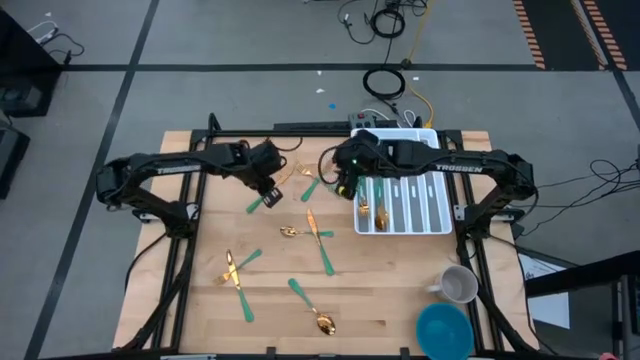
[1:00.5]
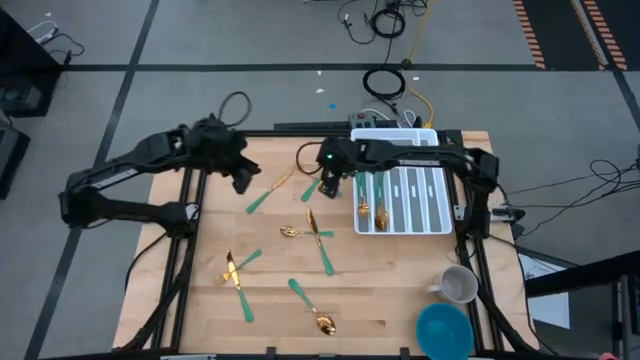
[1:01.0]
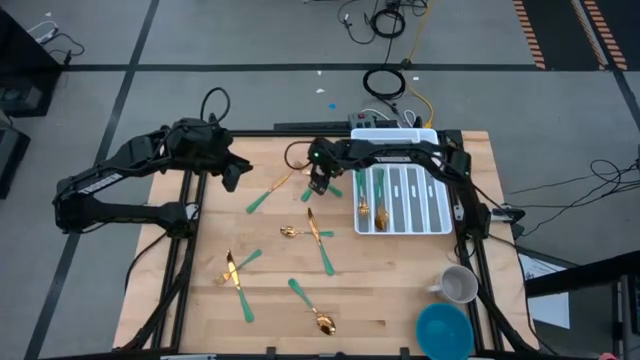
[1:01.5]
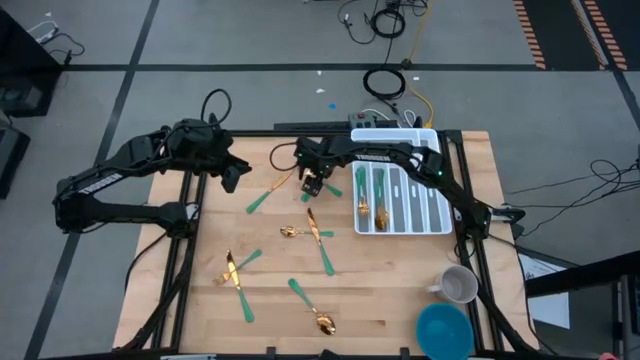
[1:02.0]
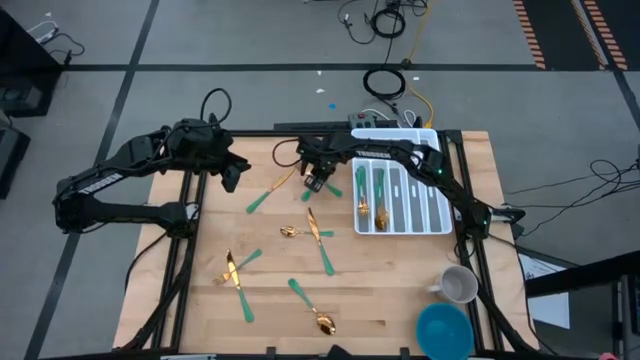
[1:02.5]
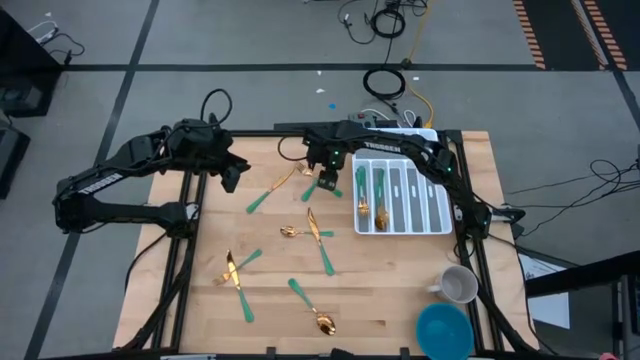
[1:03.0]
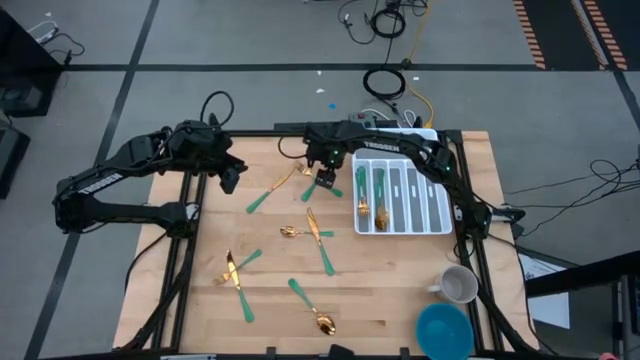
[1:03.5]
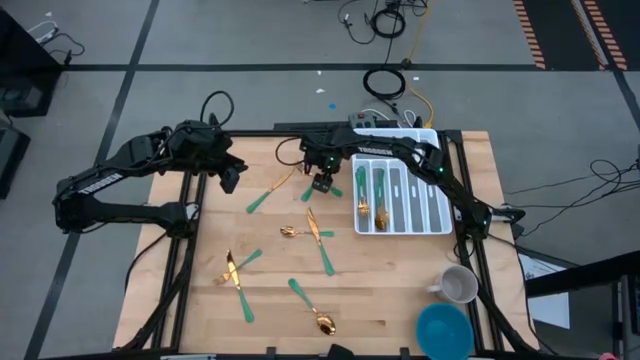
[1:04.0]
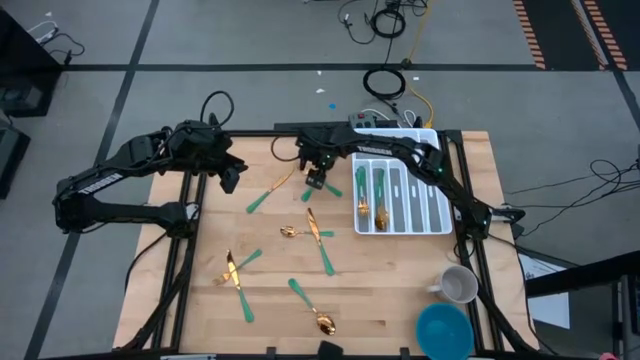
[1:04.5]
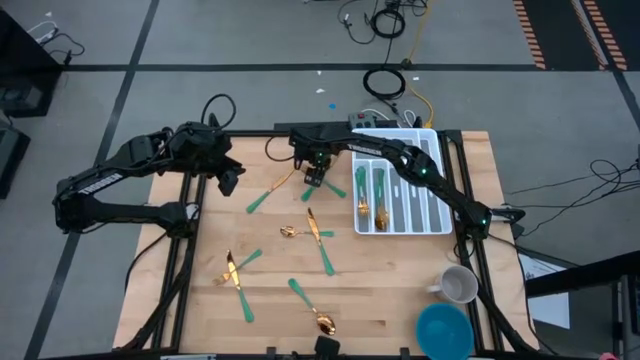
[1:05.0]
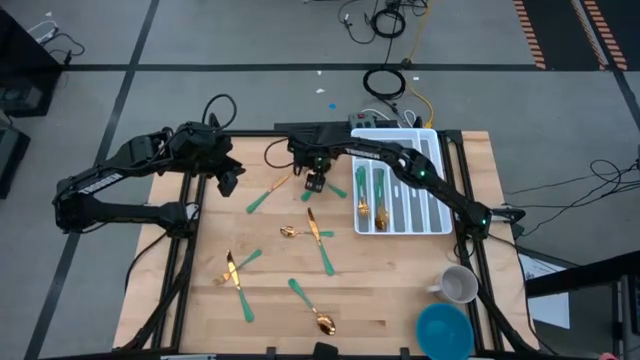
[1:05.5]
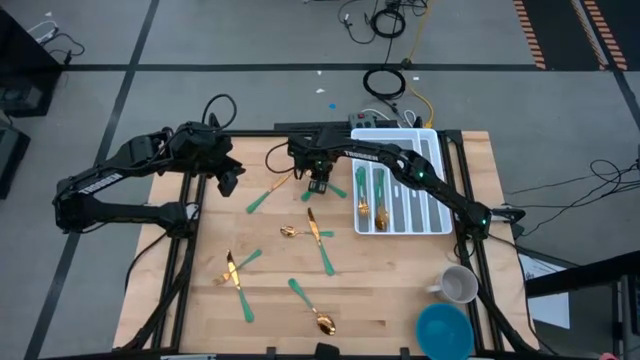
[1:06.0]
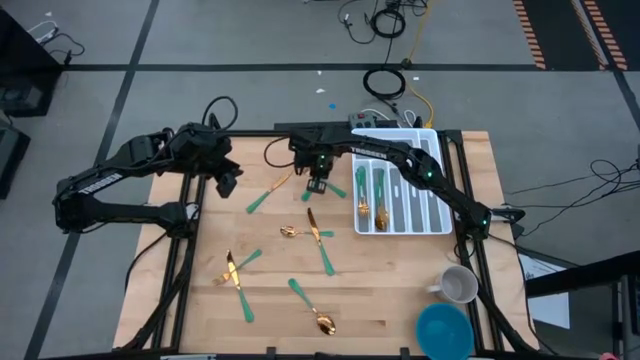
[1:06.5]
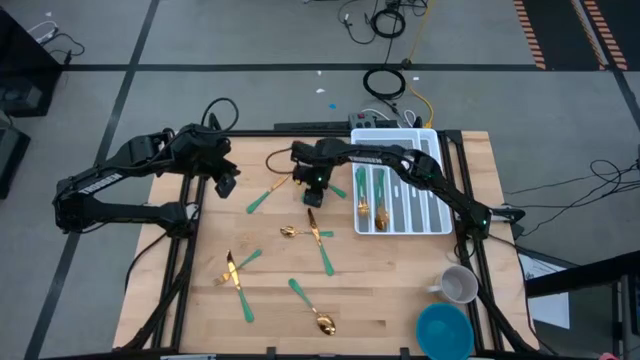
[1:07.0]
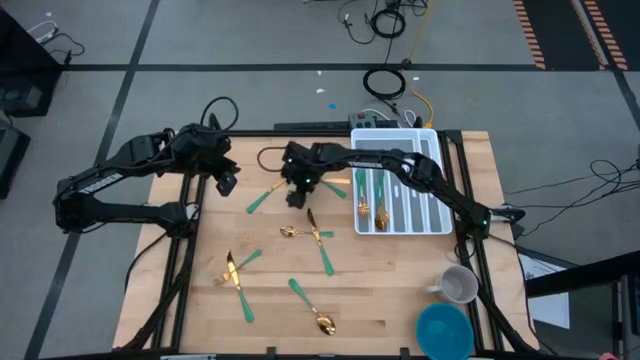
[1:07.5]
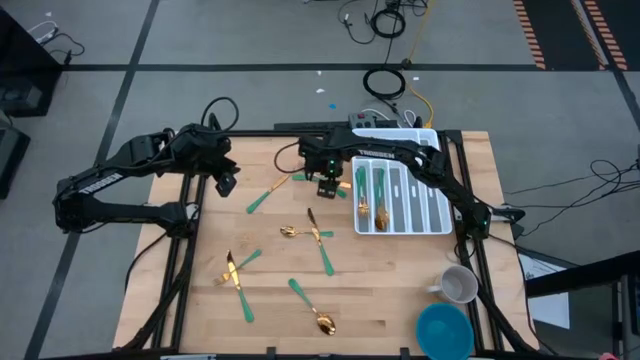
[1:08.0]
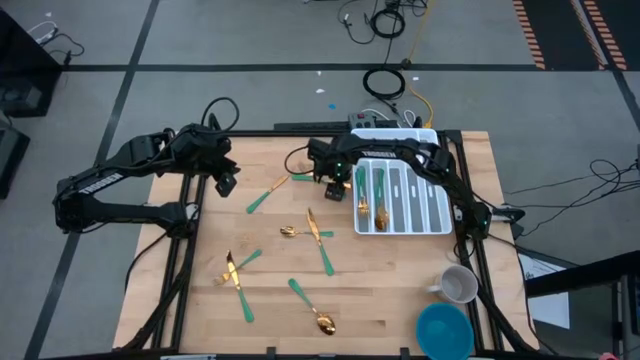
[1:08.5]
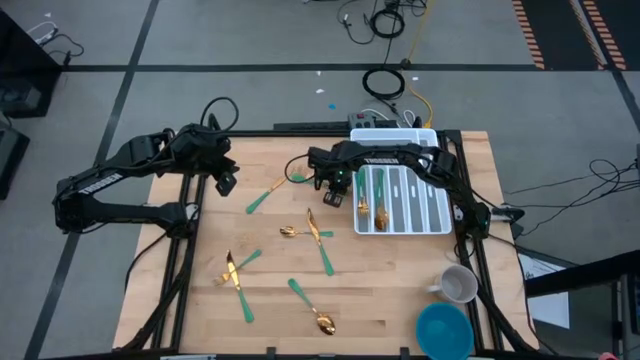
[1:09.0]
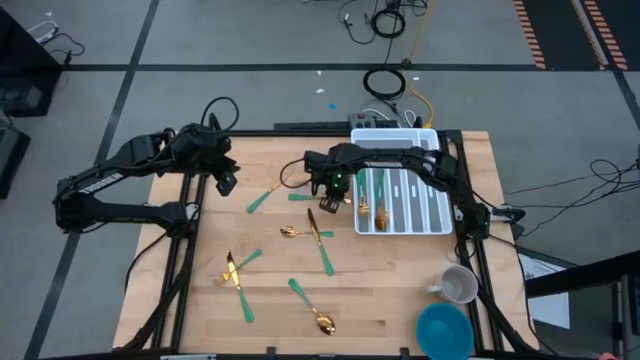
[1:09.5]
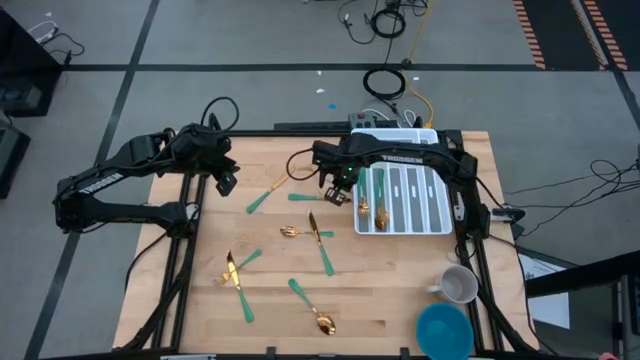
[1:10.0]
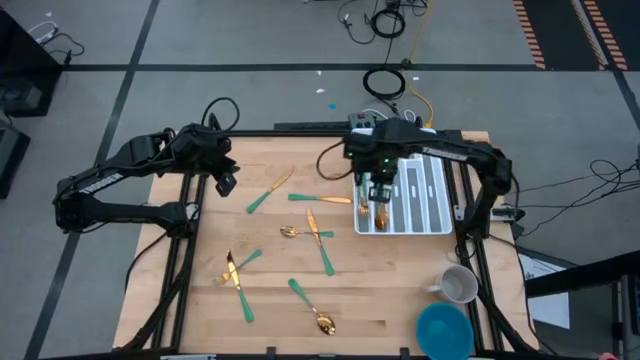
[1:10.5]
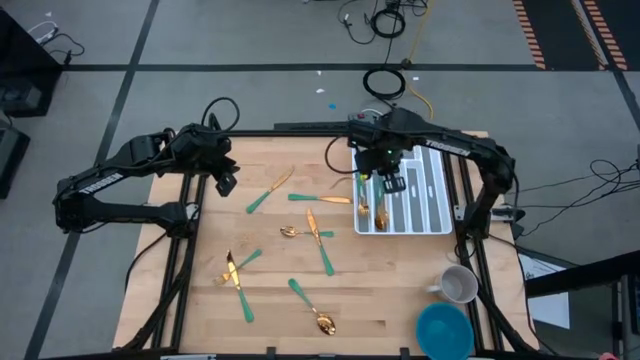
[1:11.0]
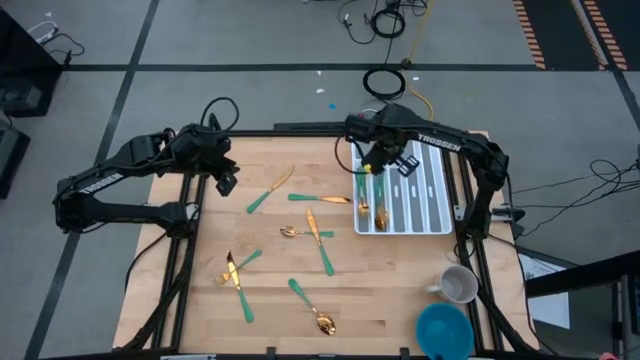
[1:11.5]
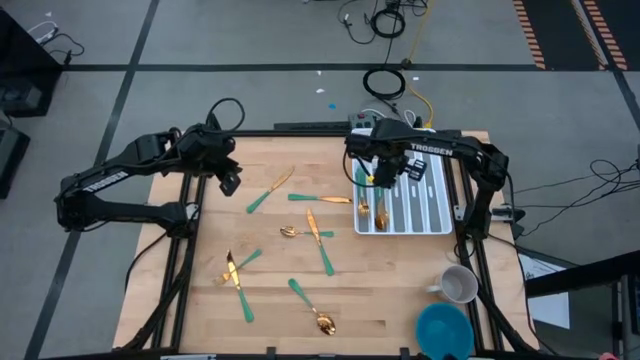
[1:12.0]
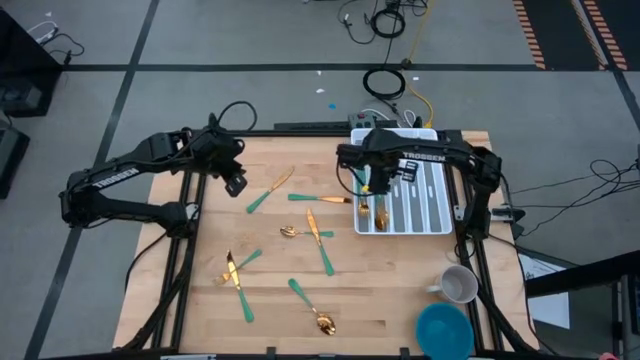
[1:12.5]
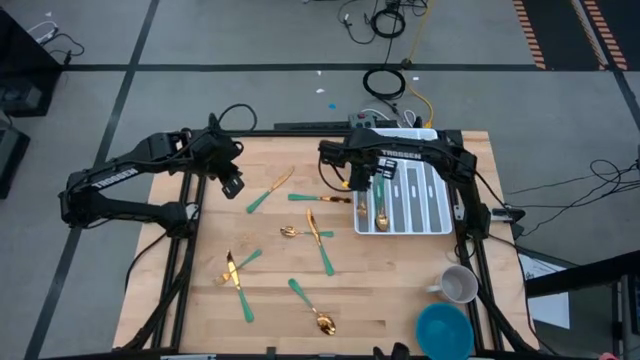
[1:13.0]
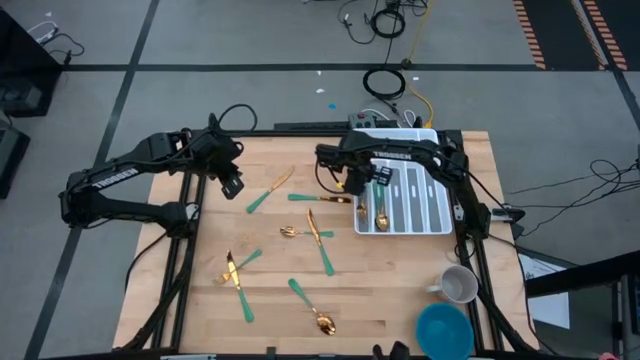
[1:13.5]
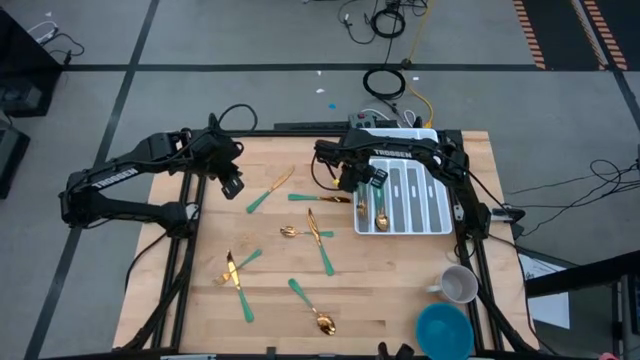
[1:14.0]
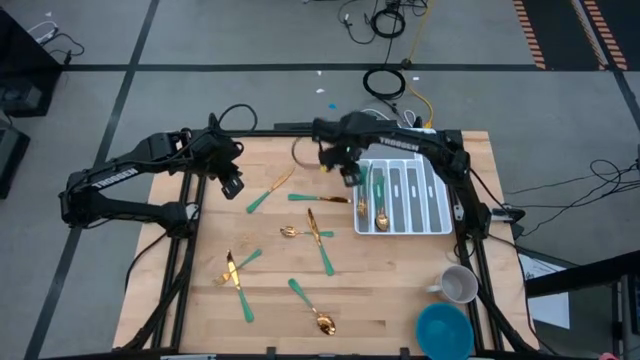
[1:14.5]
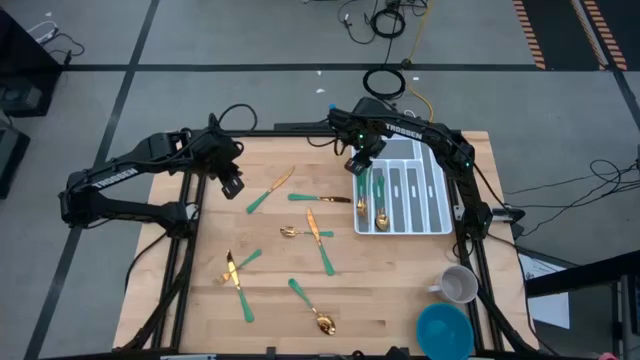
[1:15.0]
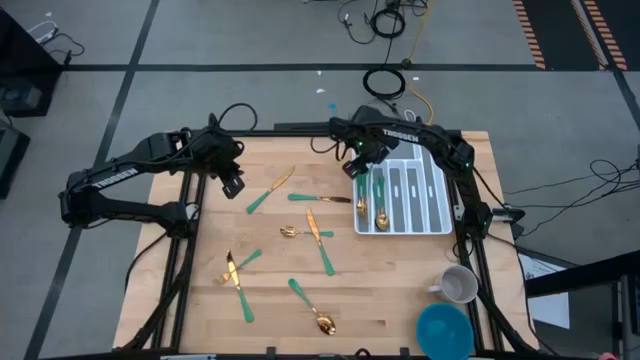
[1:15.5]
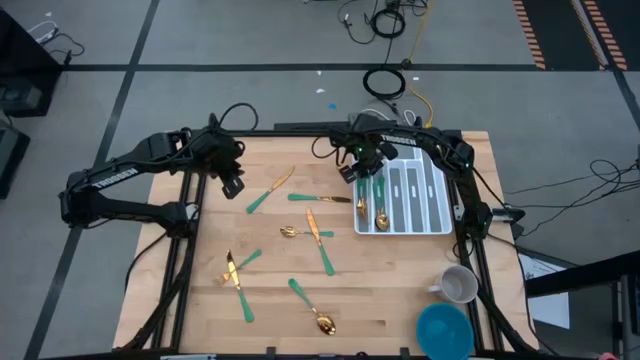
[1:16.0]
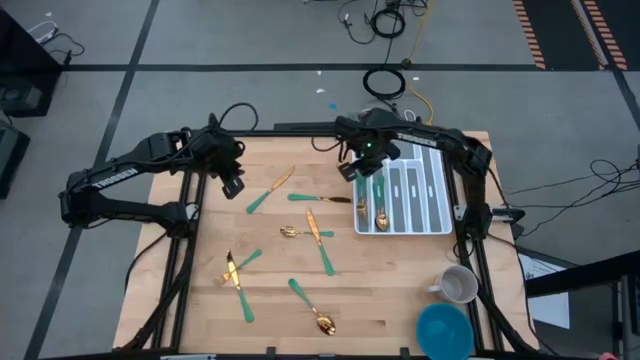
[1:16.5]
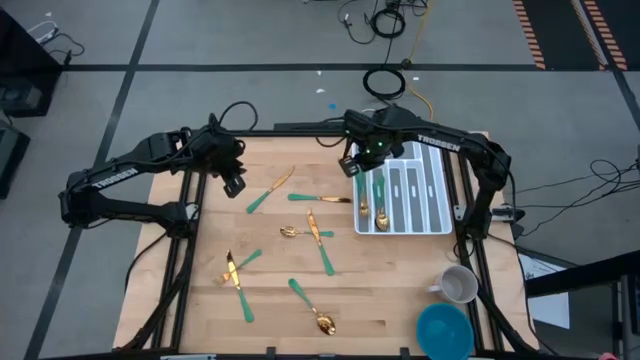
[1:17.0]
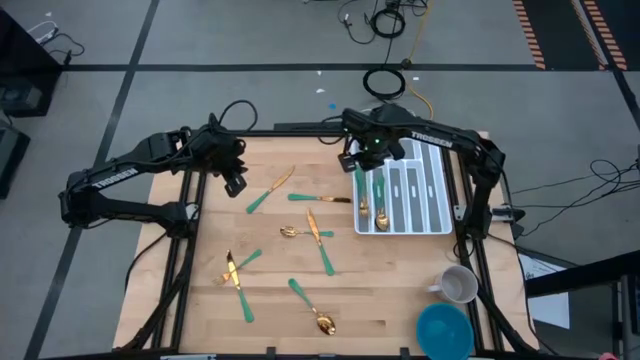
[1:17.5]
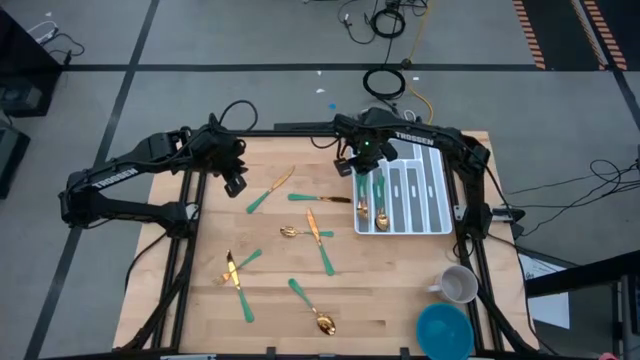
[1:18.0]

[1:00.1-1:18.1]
Task: Sort silverware
Put the fork into the silverware tray

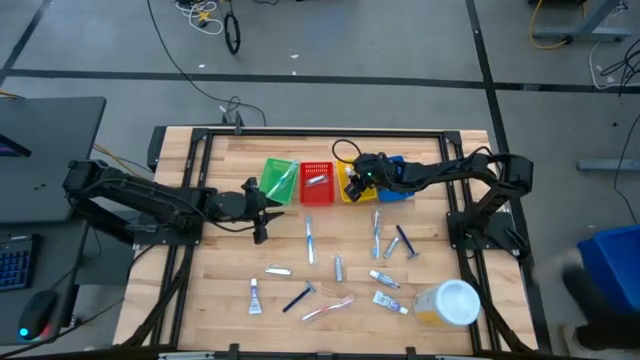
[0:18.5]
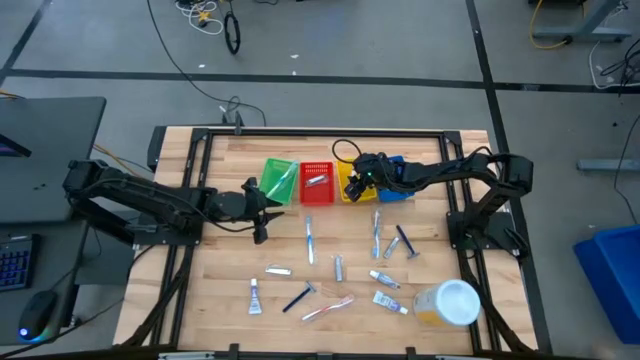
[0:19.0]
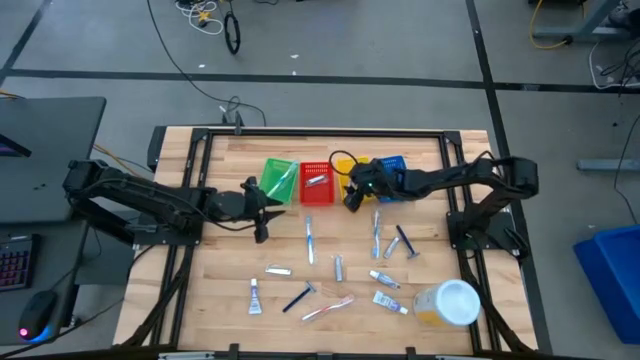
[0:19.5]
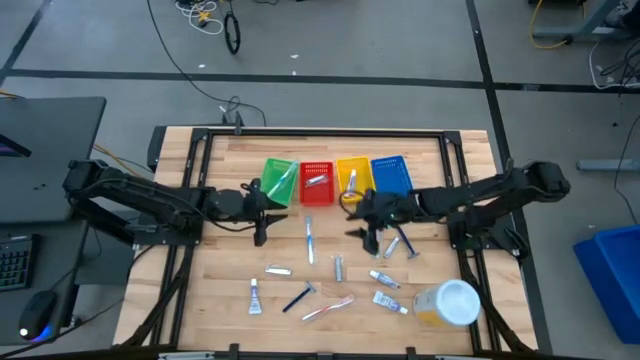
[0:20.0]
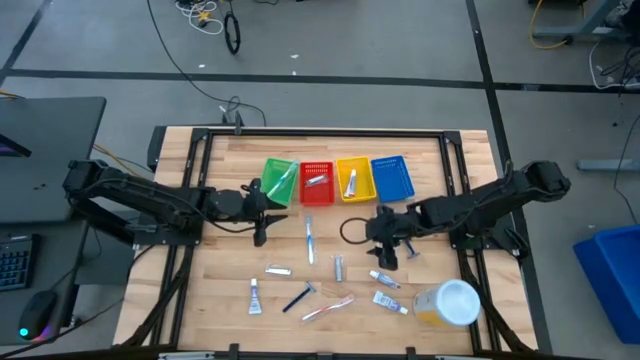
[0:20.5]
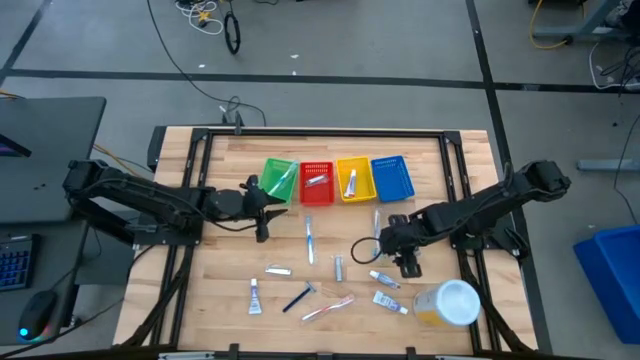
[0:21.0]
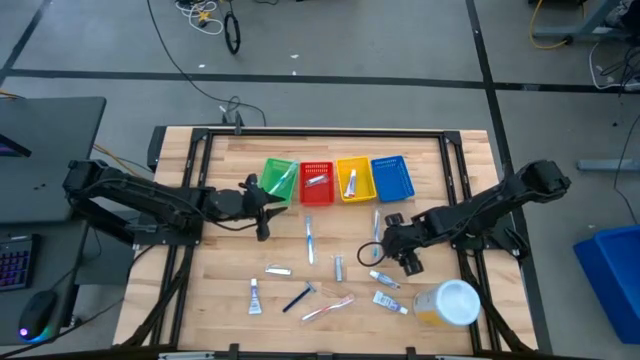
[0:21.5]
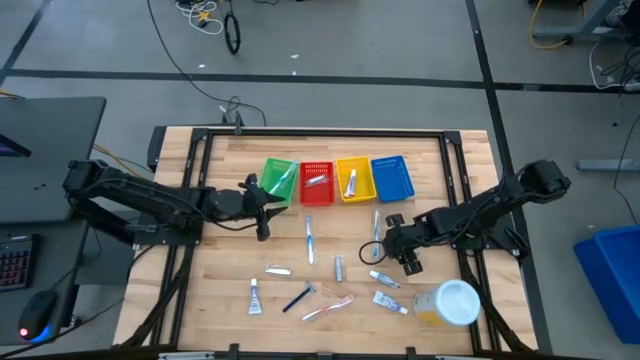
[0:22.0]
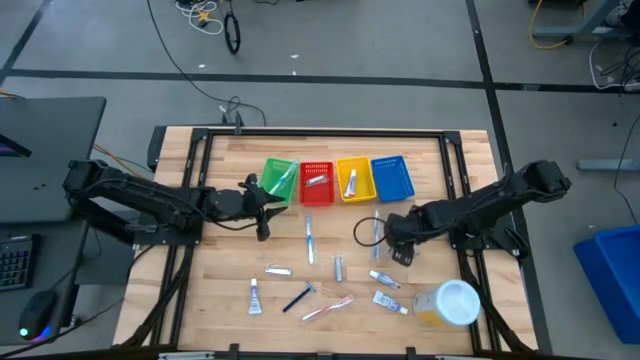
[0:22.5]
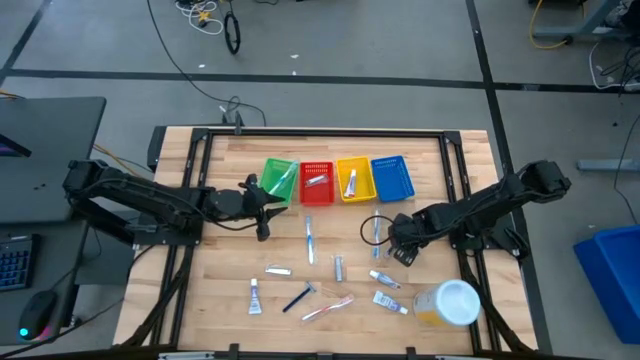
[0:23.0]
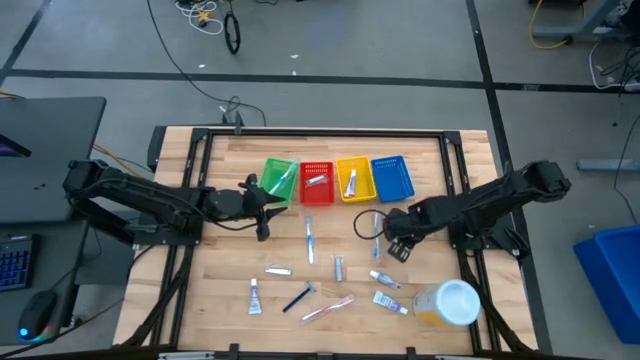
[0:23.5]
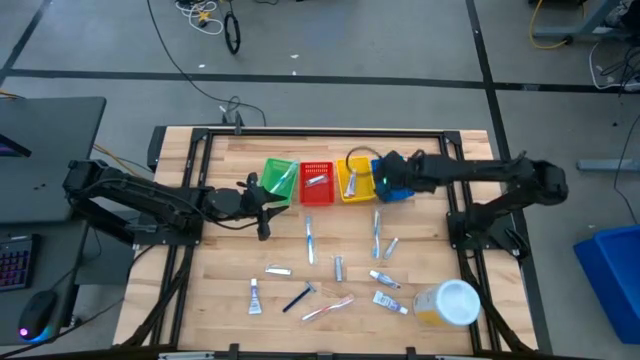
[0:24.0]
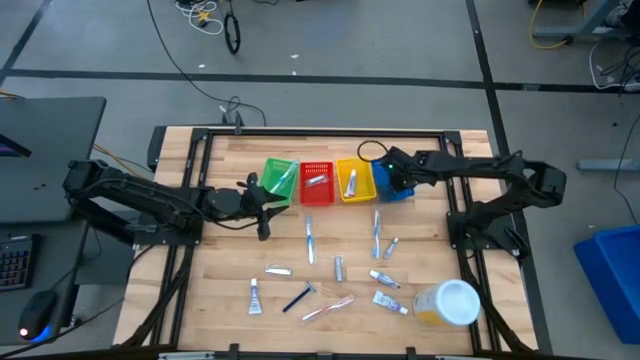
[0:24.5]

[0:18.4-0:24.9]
Task: Pick & Place Travel size toiletries
Put the blue razor into the blue bin
